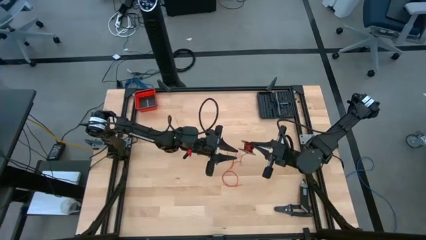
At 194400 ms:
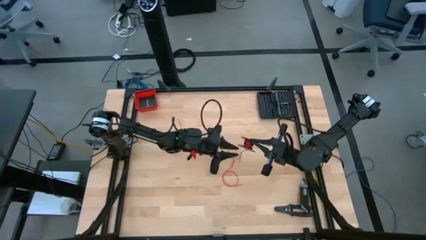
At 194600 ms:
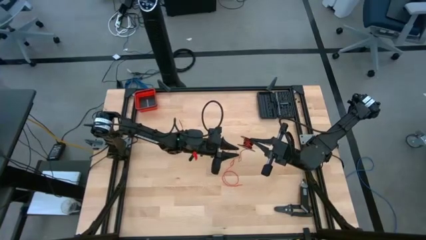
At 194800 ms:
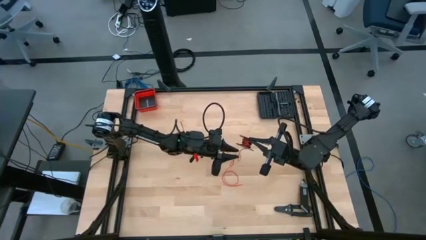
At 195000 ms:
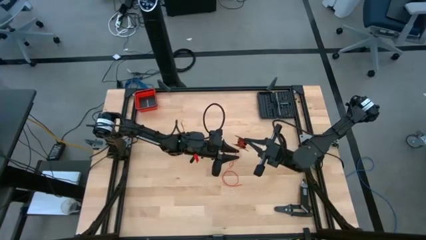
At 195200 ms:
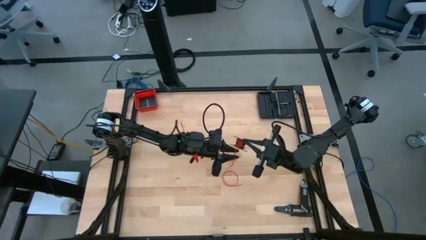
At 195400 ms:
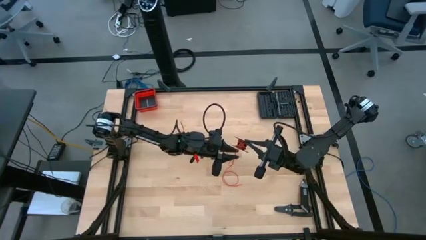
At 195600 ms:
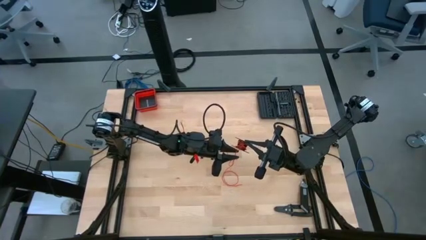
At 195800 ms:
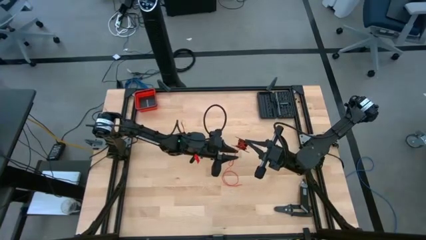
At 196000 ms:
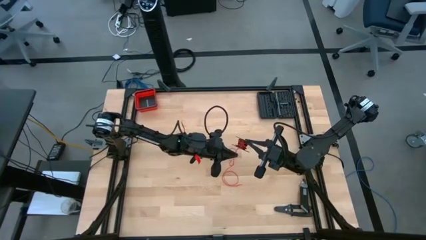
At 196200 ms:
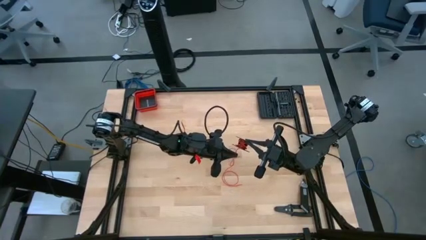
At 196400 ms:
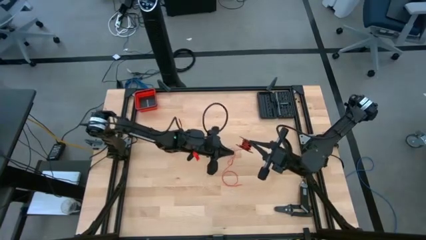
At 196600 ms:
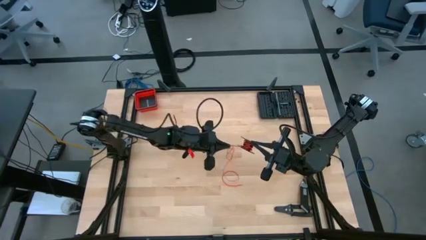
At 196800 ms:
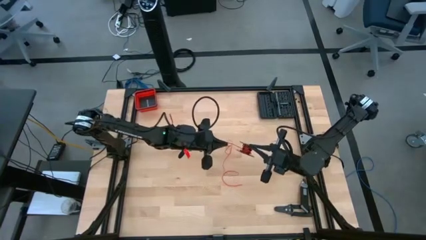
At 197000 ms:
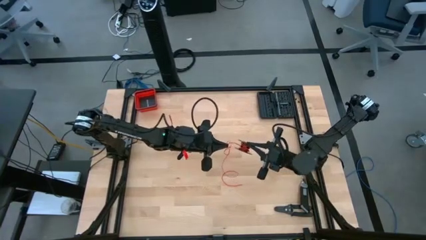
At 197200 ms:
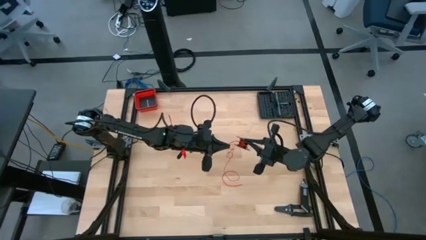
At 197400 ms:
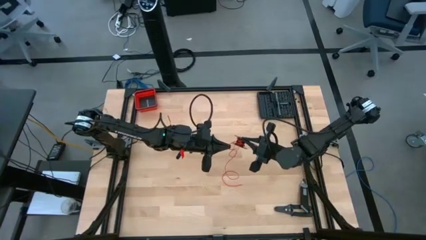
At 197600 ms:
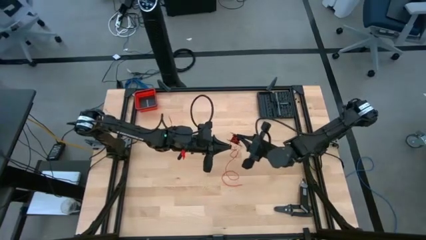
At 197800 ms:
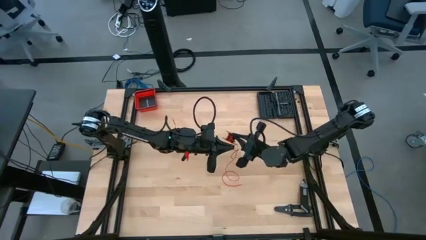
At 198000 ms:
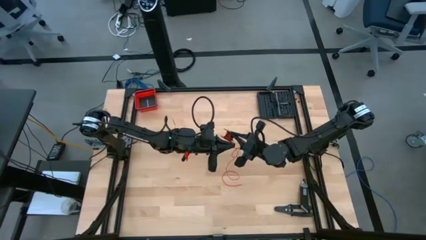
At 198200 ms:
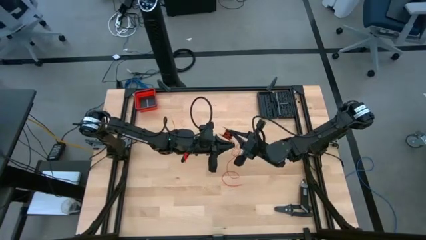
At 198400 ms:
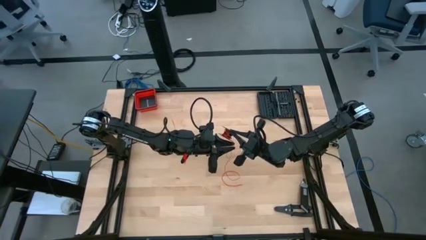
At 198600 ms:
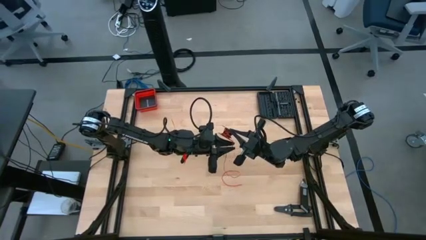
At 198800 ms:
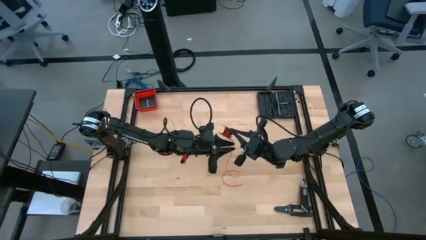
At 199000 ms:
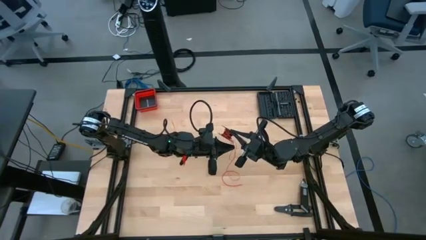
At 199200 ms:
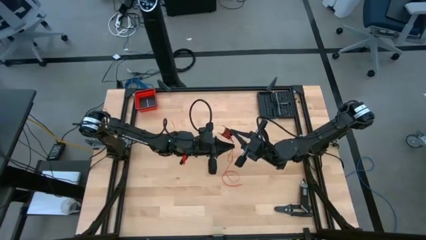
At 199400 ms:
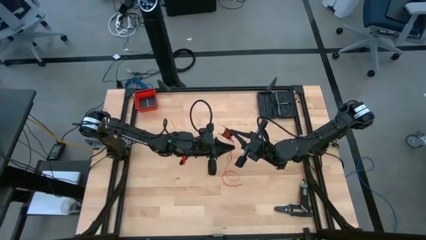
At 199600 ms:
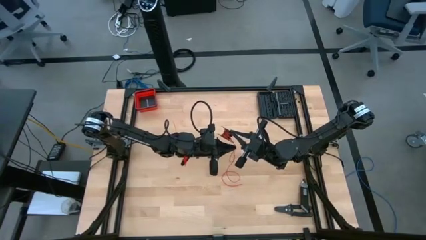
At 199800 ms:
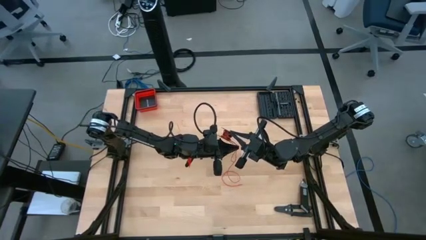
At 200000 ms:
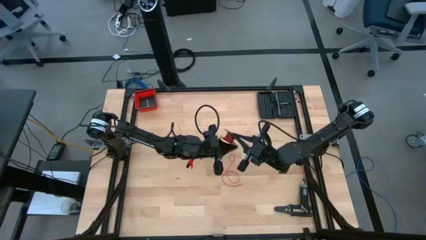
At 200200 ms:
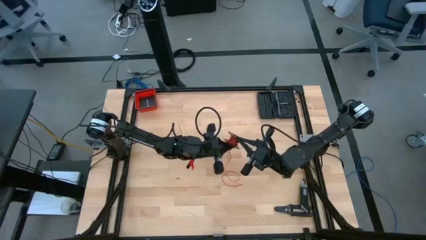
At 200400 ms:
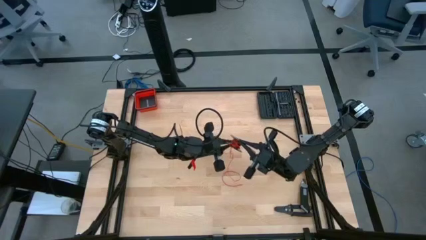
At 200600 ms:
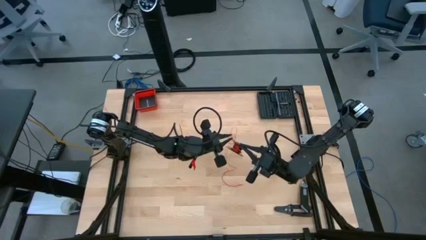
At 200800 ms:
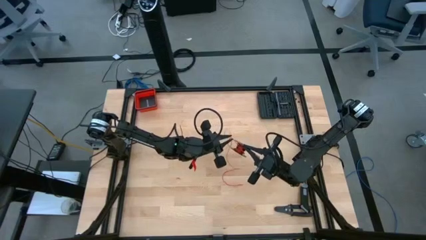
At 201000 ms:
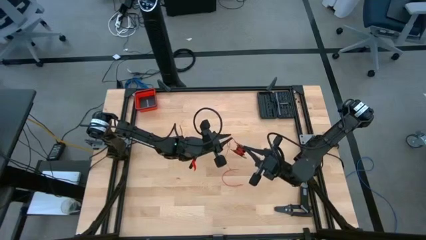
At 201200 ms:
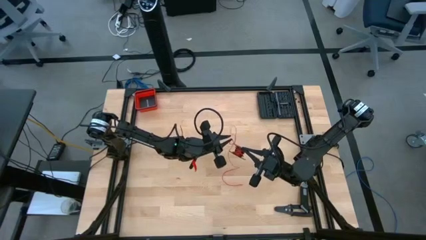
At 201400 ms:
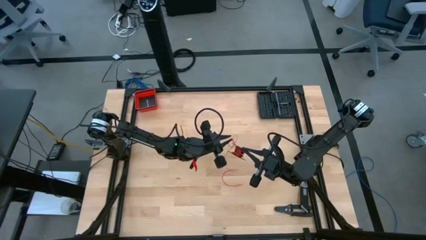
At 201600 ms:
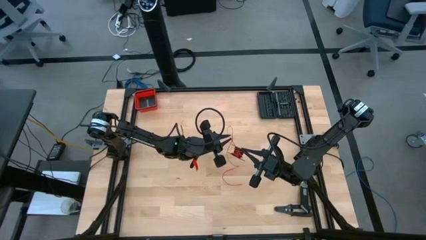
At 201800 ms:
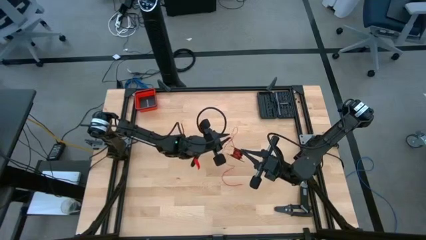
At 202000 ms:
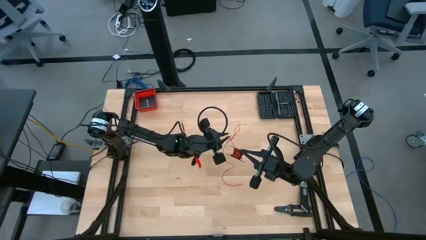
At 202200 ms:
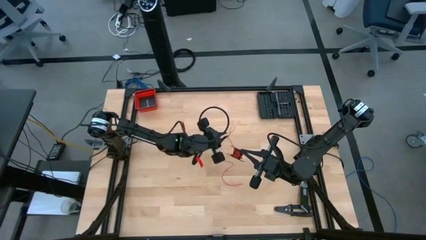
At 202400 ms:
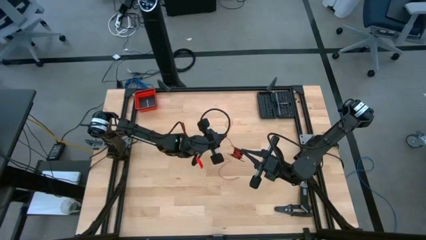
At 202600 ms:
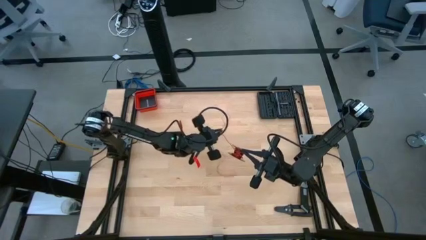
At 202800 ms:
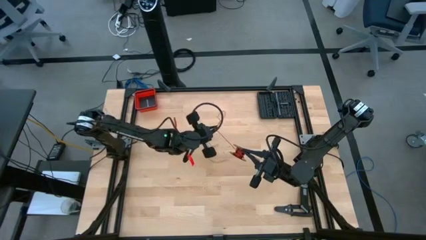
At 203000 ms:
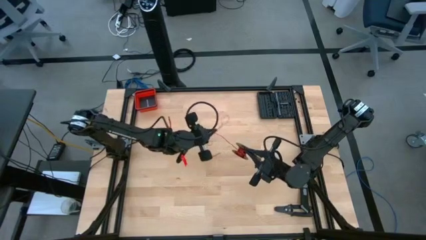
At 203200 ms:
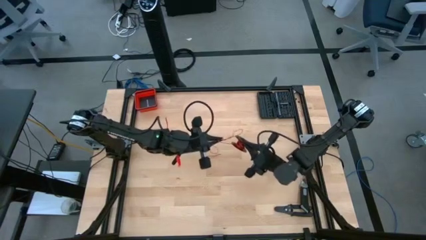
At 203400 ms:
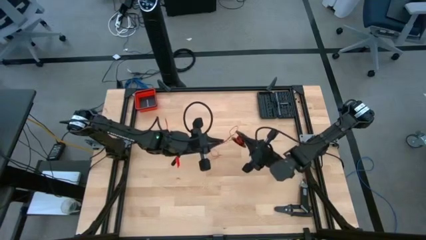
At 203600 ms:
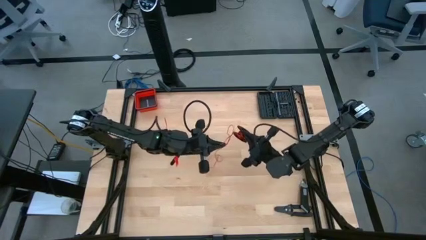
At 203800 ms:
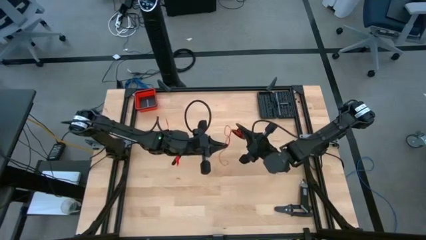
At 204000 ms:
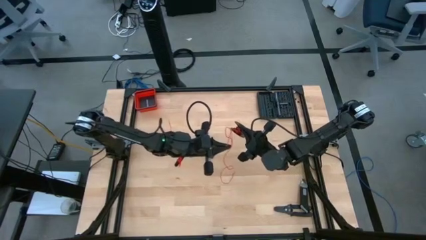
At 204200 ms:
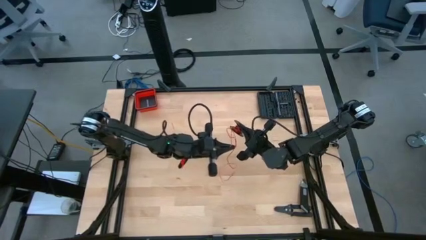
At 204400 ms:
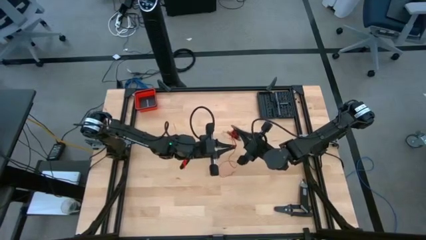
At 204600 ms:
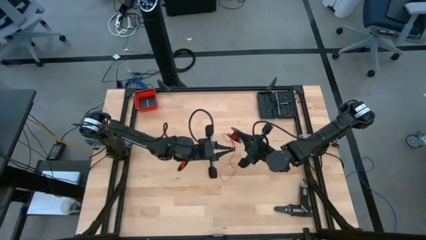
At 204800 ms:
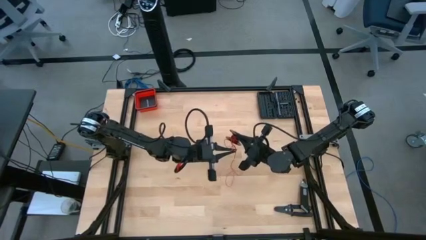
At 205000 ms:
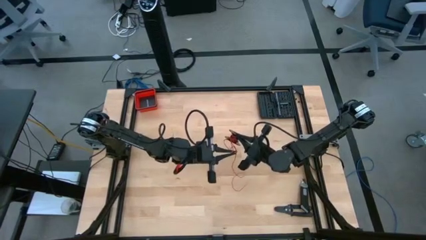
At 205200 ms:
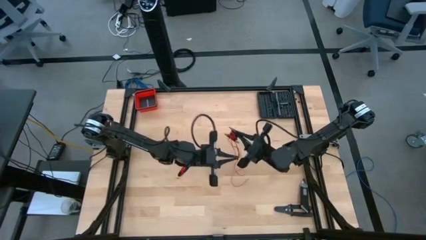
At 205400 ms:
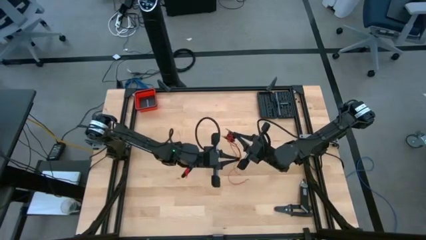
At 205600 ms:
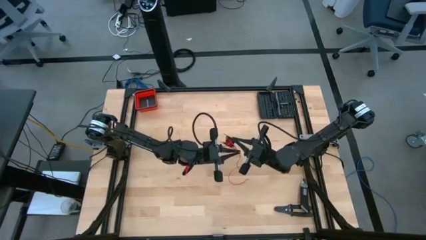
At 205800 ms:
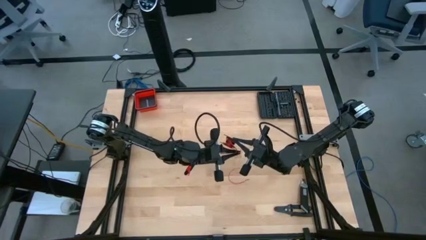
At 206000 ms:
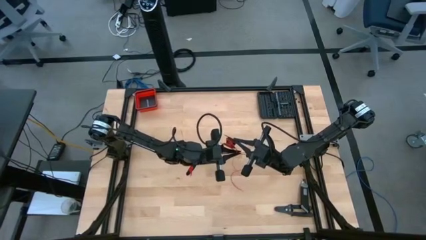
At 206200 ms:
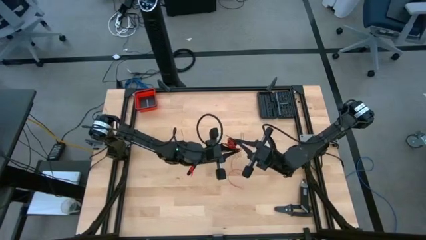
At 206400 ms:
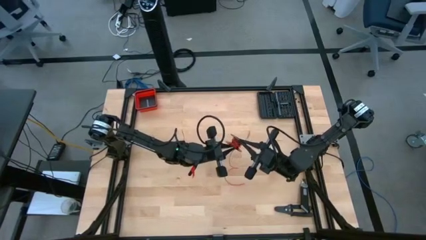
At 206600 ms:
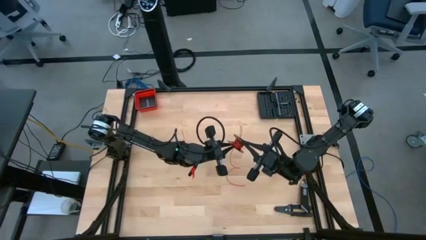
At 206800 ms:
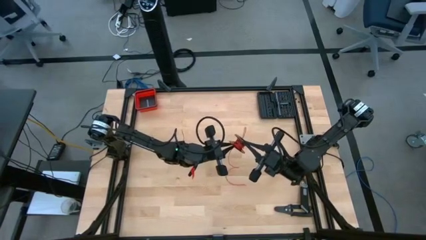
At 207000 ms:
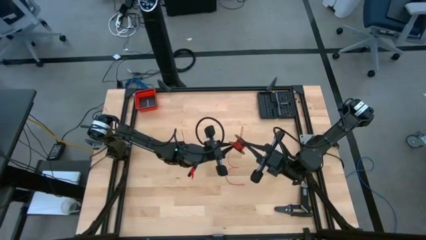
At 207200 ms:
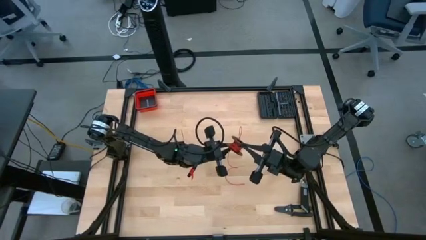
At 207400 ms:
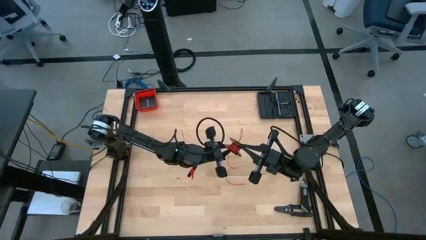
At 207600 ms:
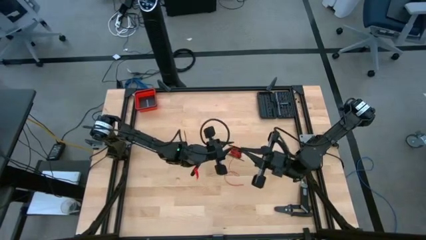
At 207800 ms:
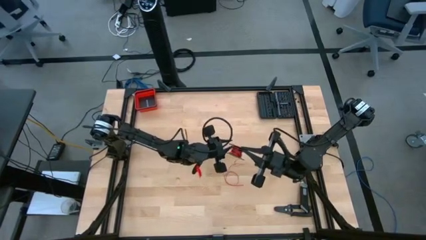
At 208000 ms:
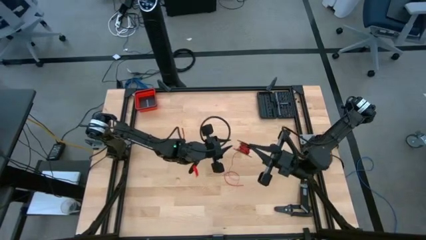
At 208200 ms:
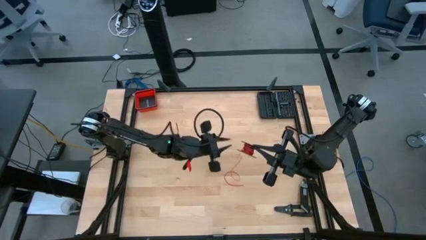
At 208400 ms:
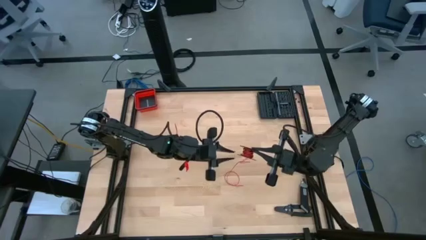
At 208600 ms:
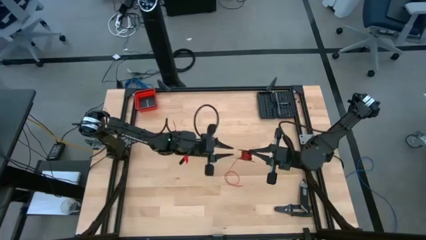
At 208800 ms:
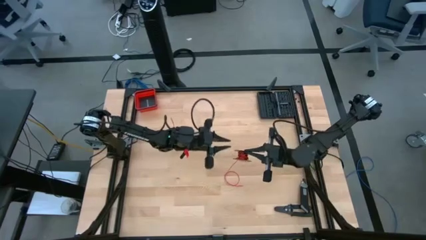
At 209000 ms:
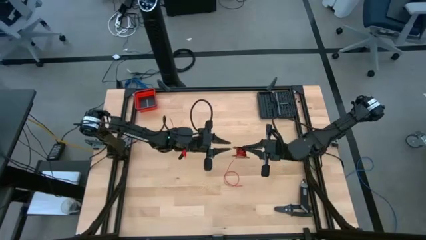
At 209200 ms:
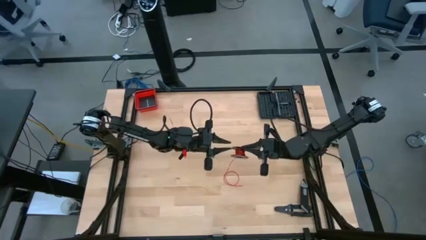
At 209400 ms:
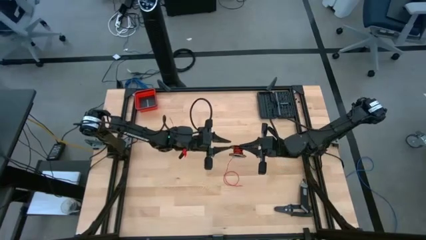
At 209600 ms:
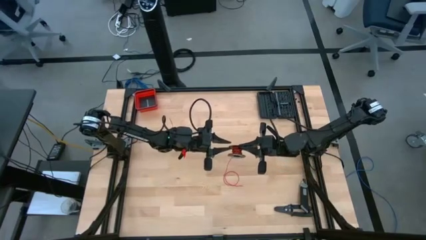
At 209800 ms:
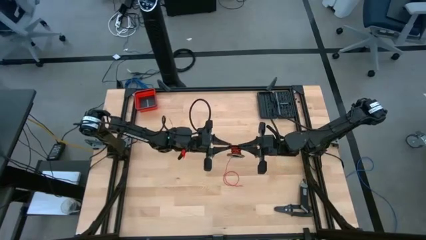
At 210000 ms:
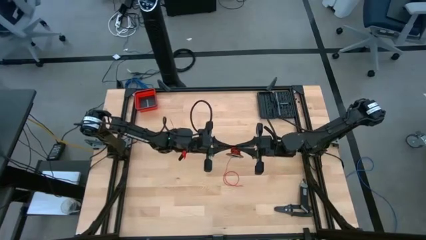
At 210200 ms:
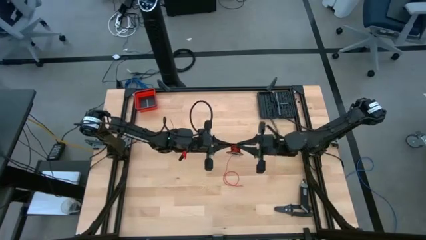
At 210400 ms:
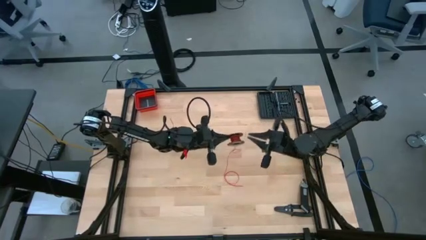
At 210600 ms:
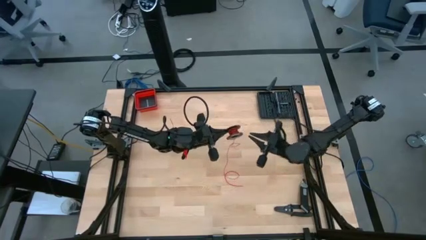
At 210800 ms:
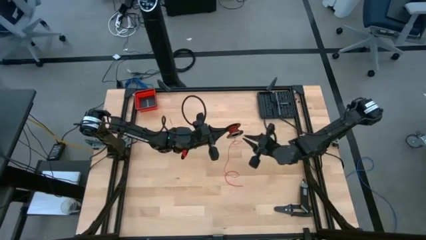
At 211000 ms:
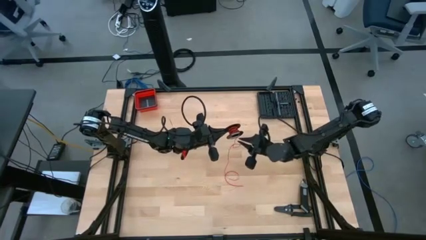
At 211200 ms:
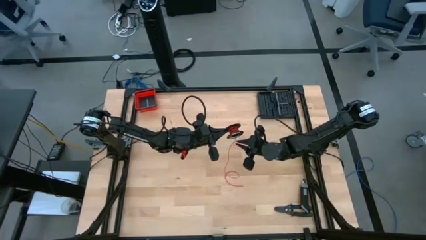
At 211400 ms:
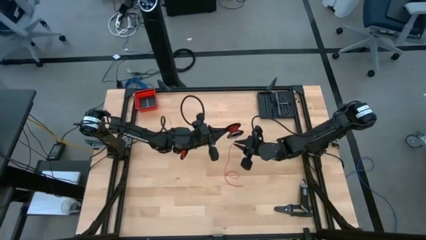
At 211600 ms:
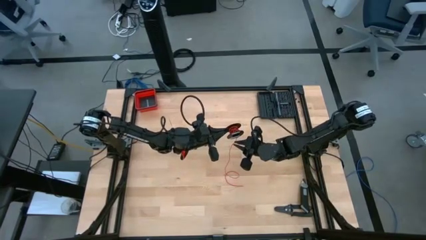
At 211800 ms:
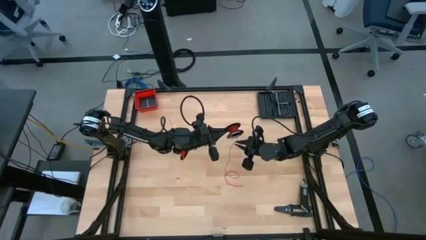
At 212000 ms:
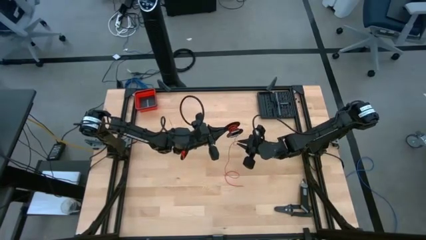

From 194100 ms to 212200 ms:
Task: Coil cords
Coil the red wire onto the spool
